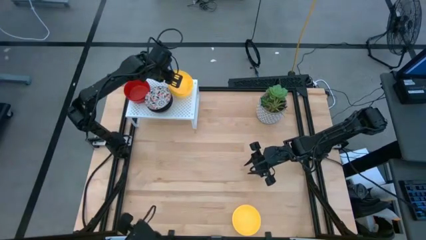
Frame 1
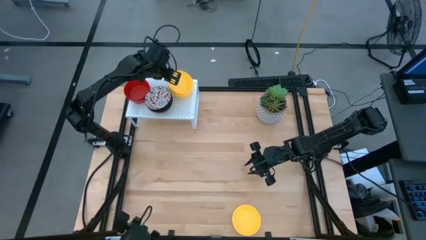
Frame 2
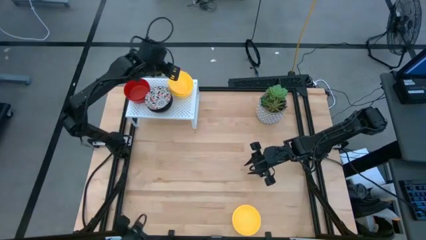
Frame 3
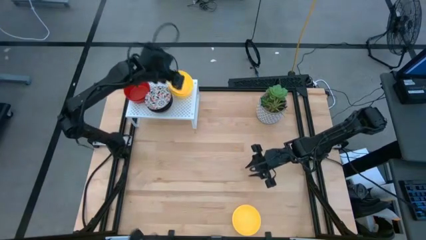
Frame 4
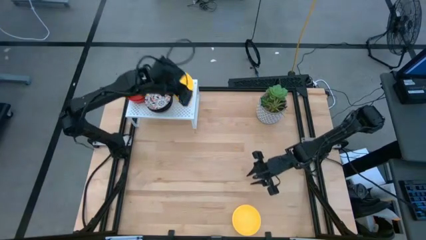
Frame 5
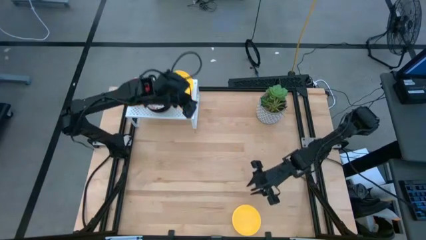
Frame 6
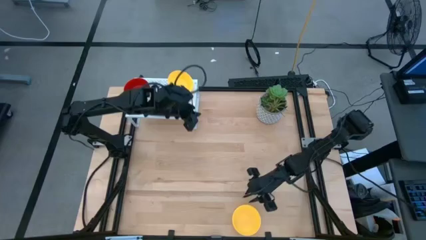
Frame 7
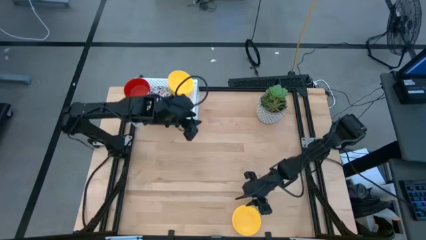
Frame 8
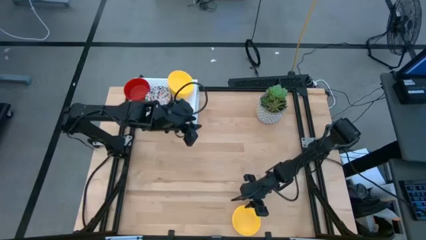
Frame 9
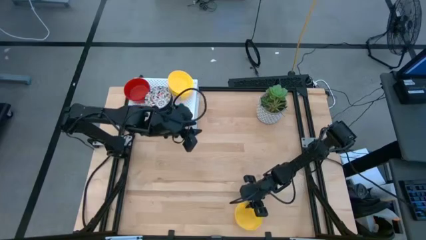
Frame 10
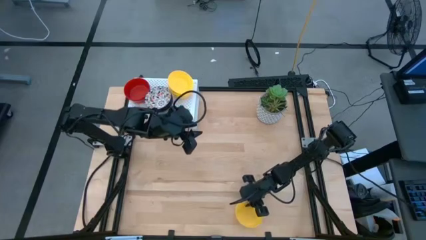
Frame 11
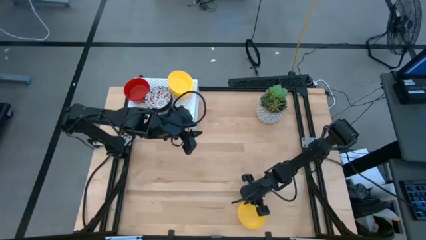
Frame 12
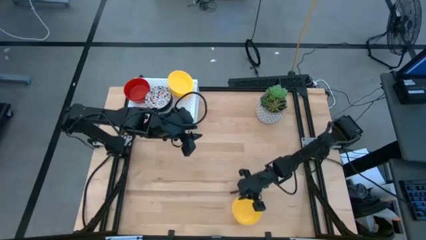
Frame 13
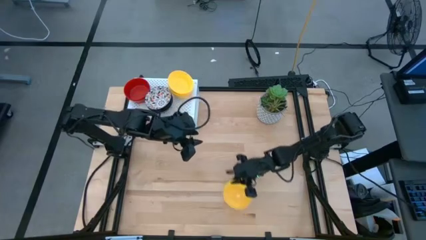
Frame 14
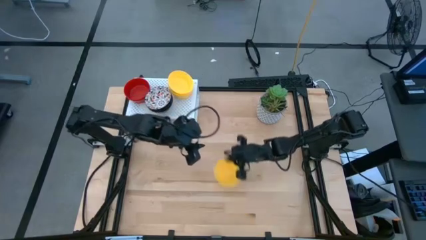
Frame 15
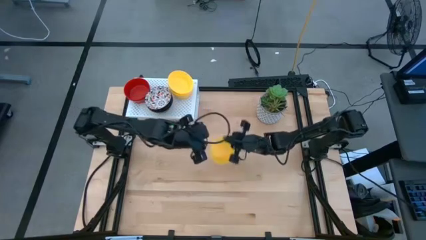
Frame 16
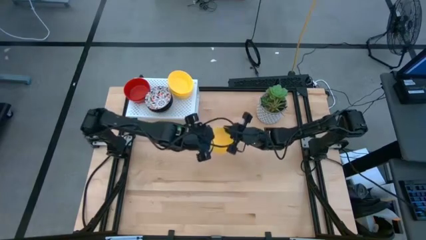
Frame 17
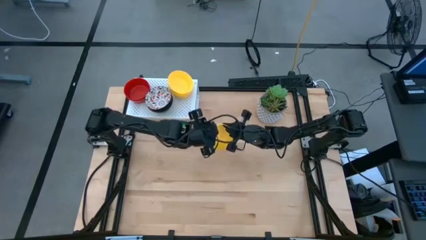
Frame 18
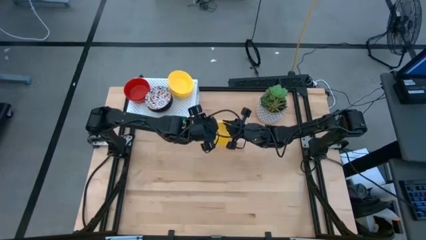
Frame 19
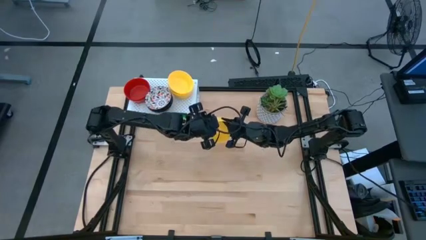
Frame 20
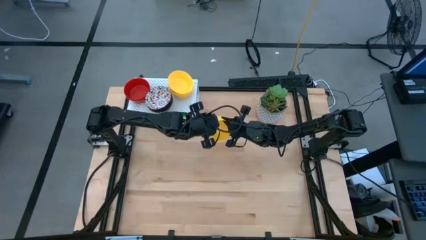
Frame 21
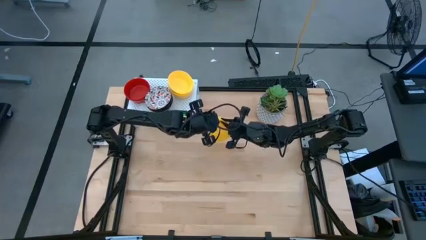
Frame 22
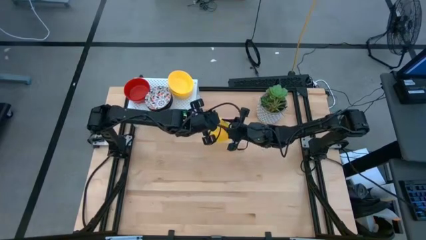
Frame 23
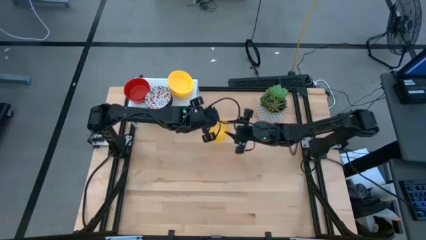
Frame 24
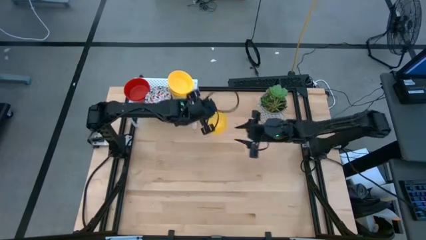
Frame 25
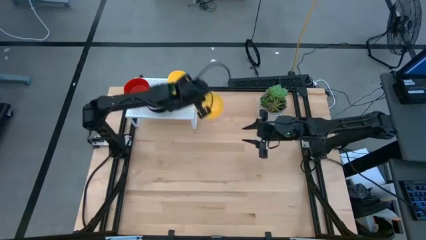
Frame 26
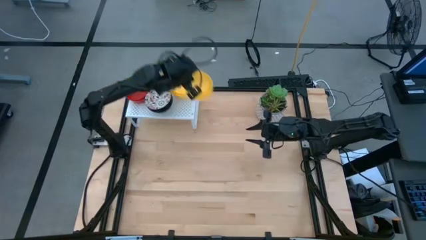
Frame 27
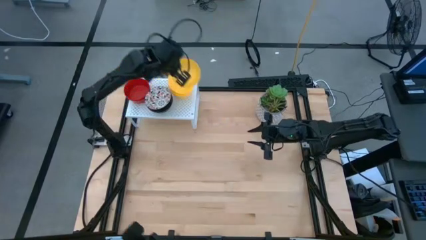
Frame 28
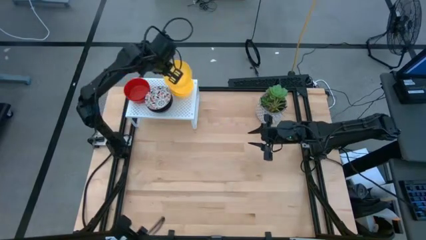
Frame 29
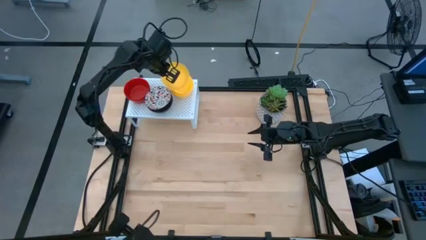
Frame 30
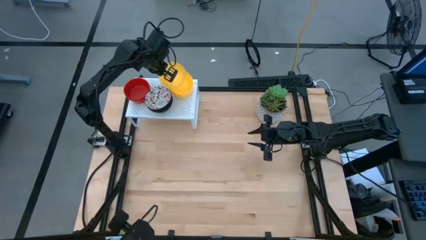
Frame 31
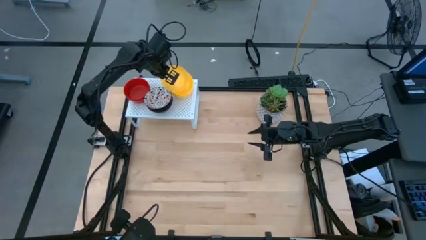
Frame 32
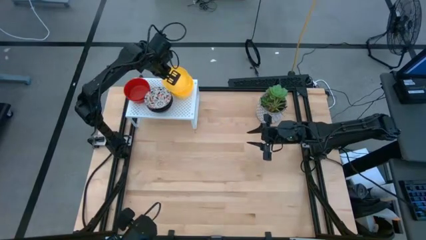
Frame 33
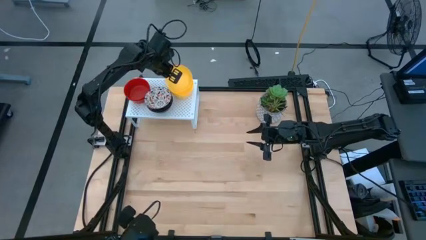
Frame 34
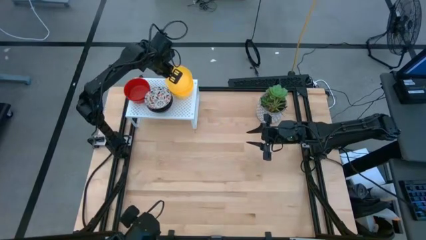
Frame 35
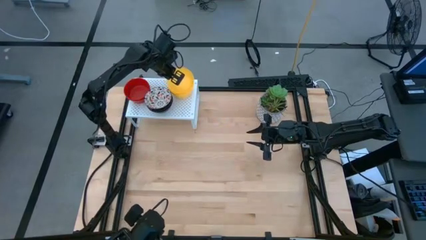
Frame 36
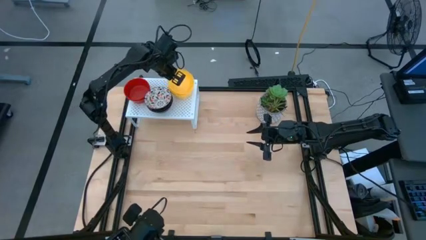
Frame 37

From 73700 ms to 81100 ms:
Task: Pick & Place Mini bowls
Stack the yellow bowl on top of the yellow bowl on the shelf

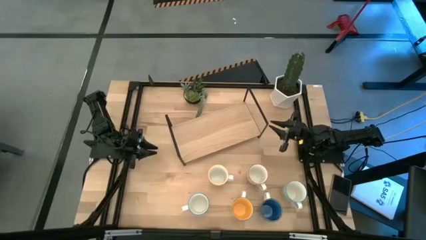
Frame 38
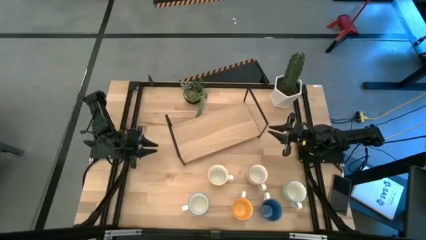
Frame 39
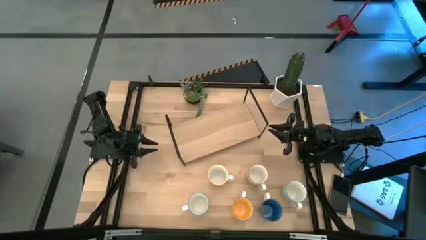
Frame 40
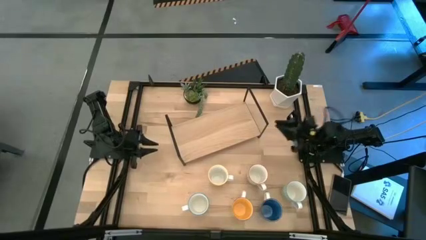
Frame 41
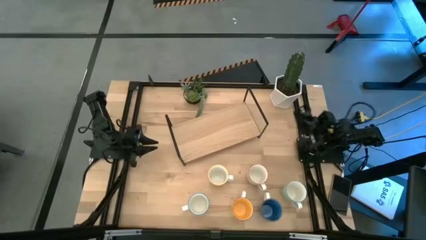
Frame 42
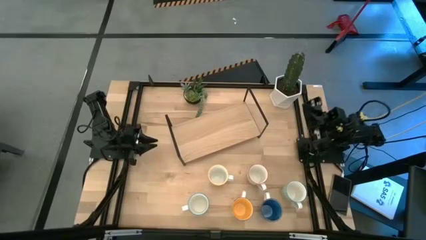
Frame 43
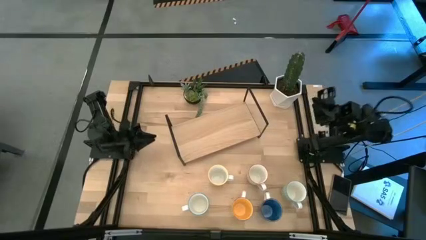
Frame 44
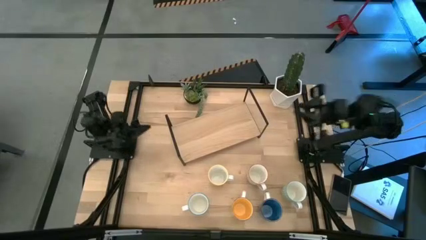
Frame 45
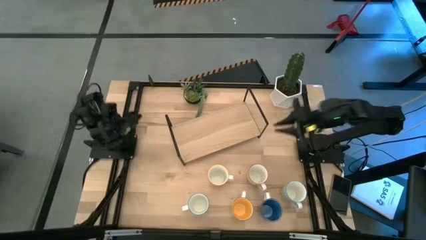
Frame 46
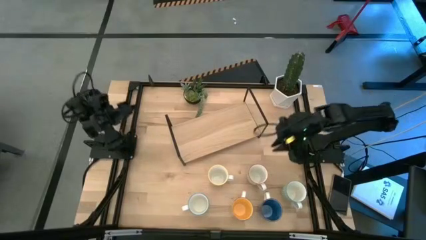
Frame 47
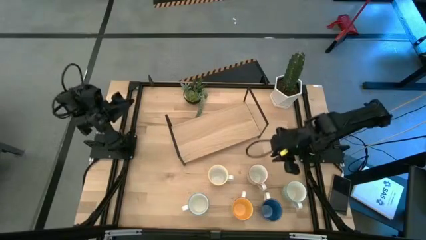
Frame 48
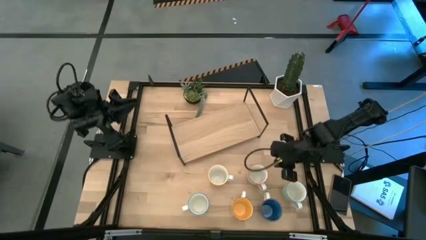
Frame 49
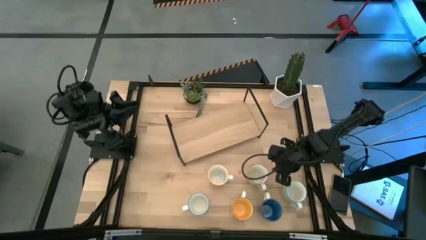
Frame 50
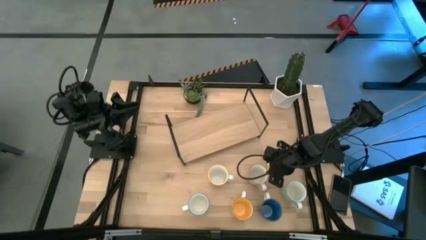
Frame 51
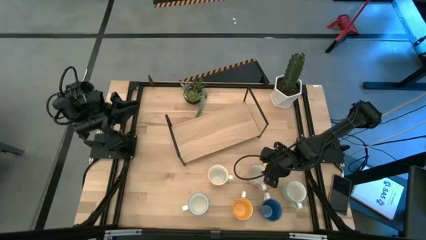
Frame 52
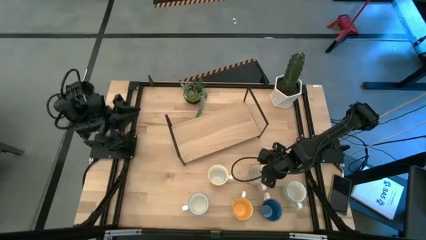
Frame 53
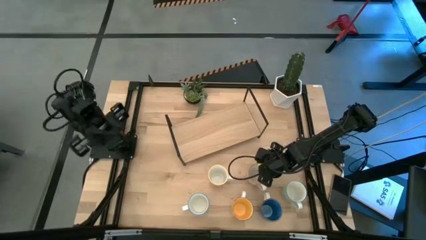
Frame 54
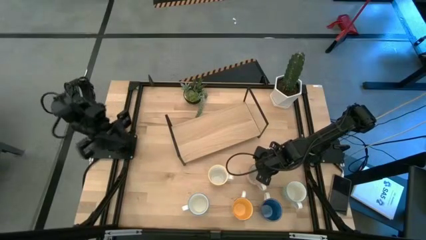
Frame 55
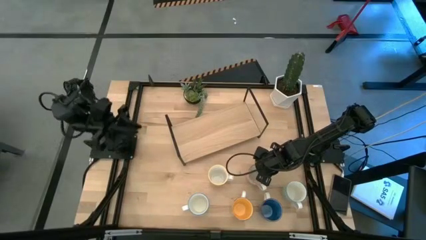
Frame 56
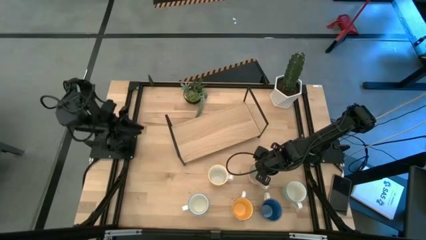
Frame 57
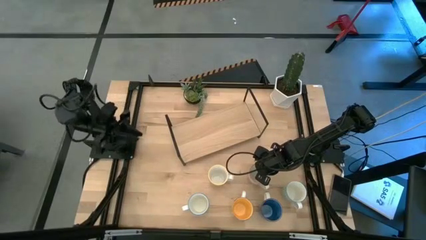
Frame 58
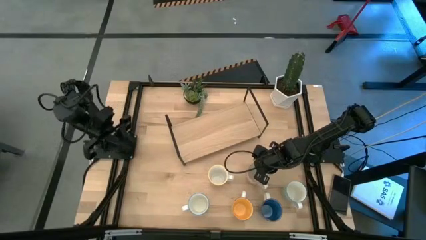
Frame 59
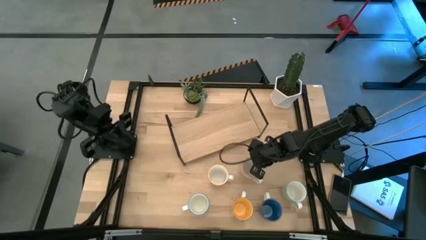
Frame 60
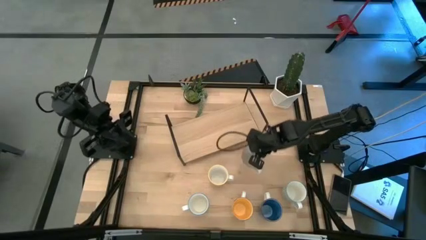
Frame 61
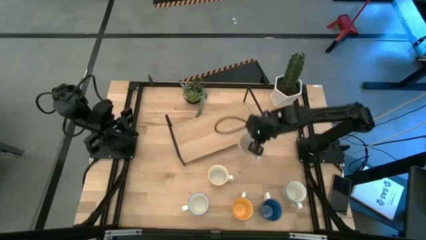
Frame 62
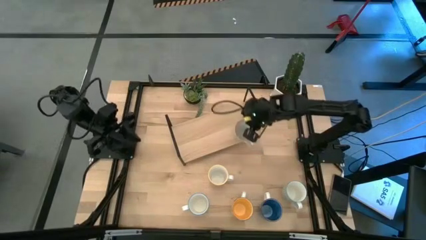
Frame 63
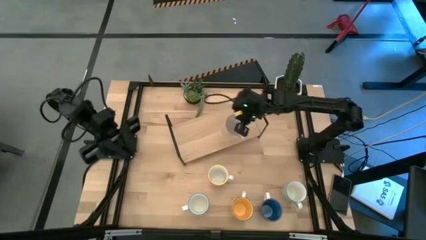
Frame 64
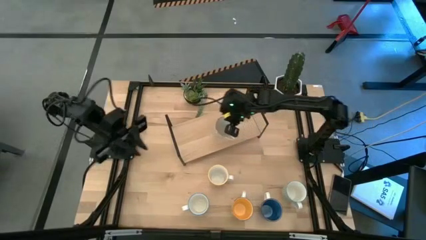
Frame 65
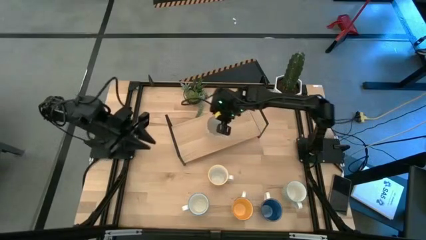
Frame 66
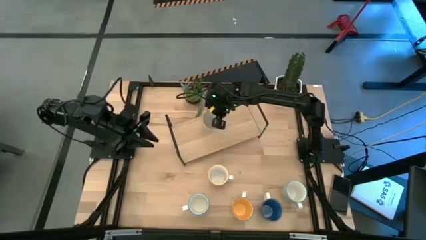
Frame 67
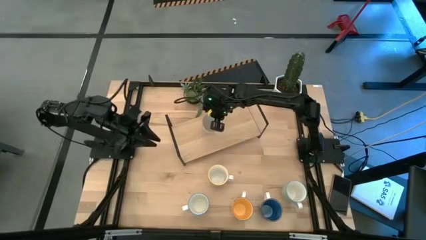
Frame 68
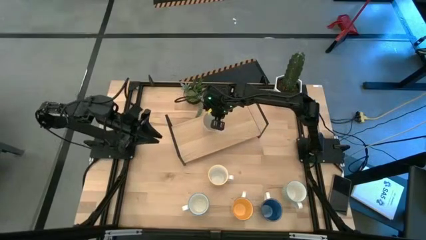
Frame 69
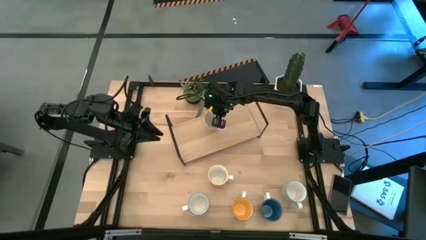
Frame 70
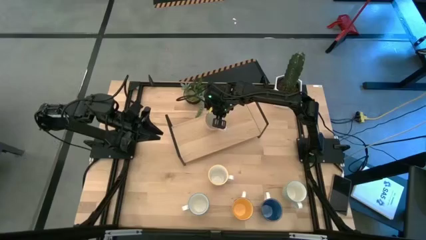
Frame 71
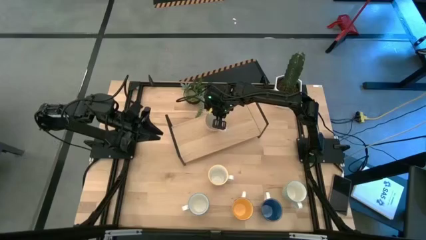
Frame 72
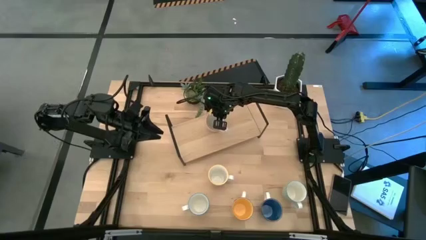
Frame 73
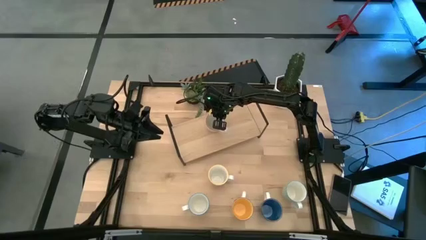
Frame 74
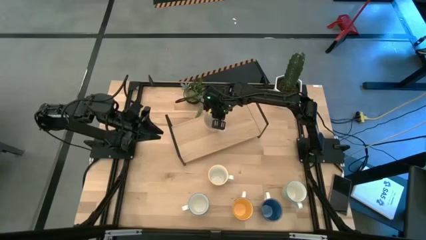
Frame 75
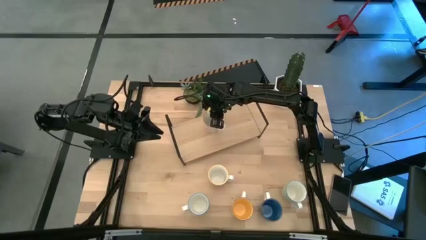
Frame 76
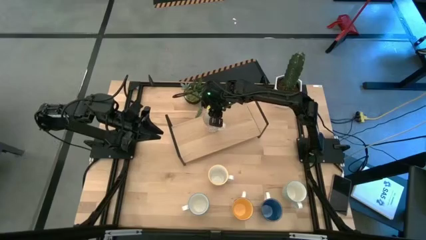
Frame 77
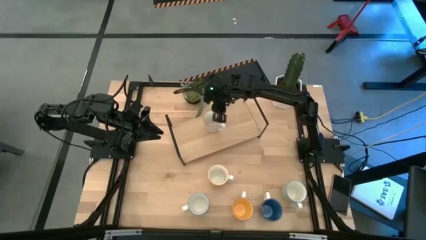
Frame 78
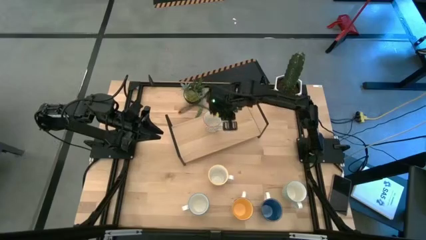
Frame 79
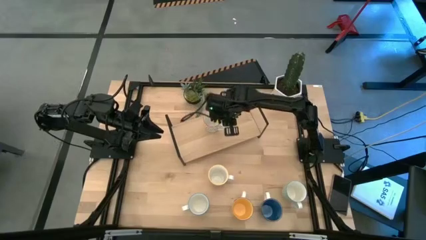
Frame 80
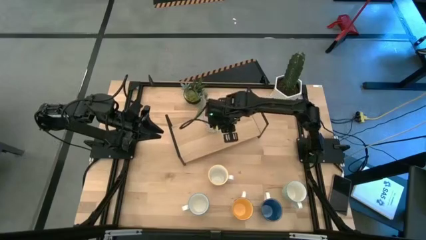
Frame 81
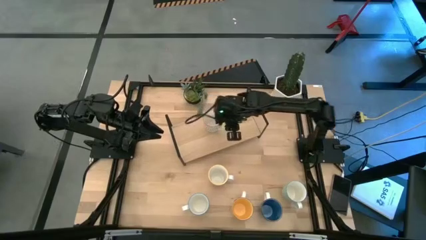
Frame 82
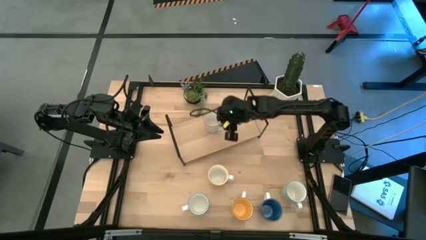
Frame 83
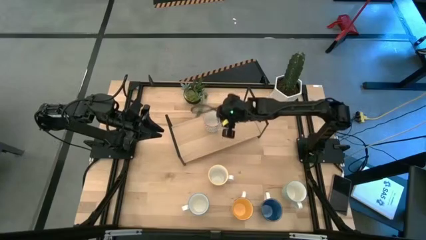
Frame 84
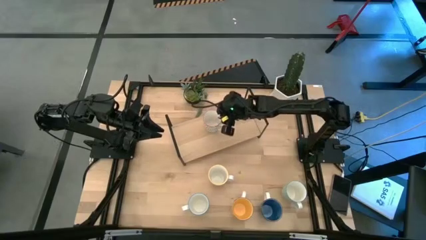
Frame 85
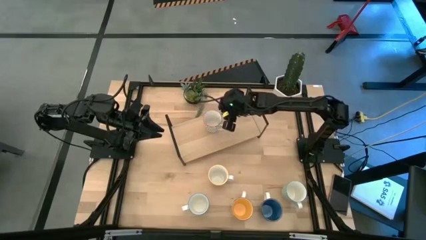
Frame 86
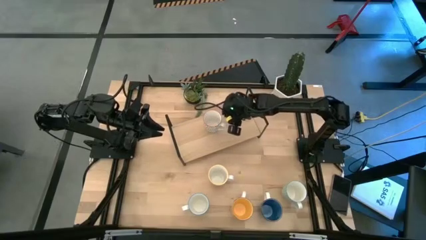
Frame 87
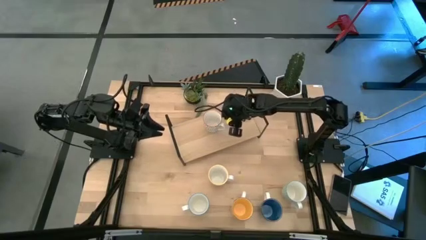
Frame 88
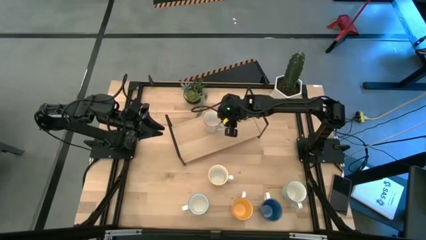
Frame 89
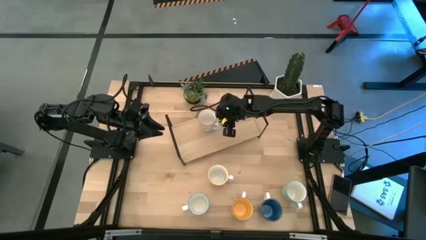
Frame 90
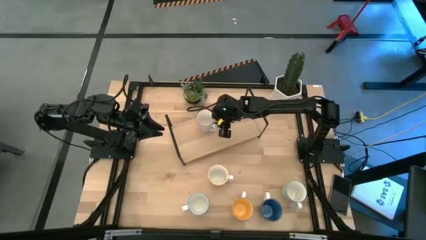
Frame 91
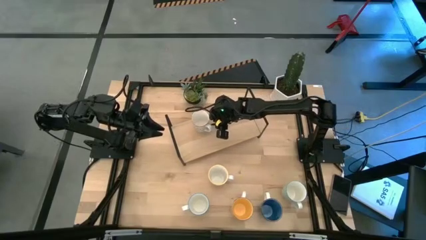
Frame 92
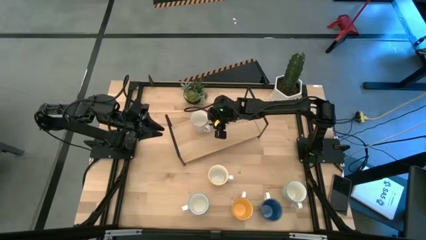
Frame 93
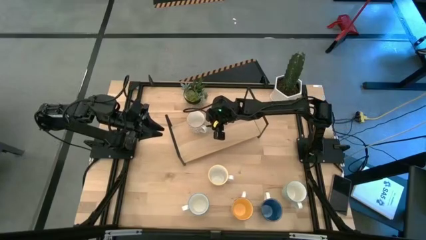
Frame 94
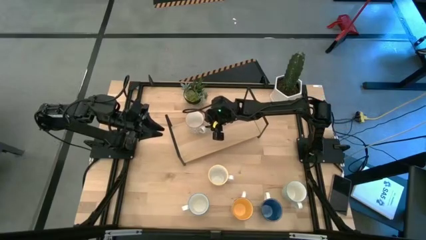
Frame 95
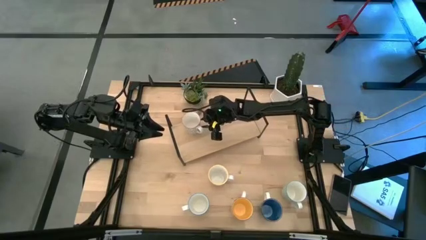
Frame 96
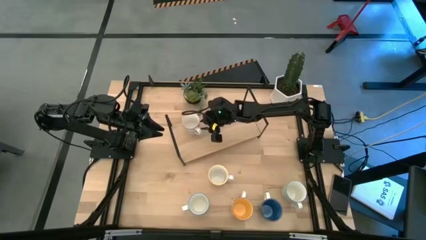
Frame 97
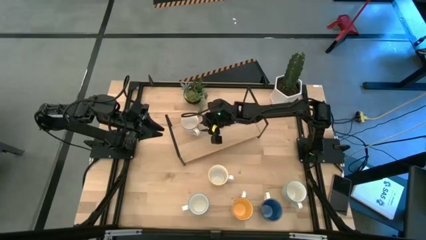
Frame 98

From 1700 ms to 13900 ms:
Task: Place coffee mugs
Put the gray patterned mug on the shelf
